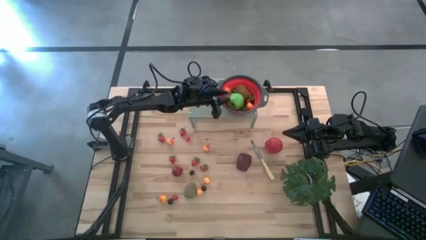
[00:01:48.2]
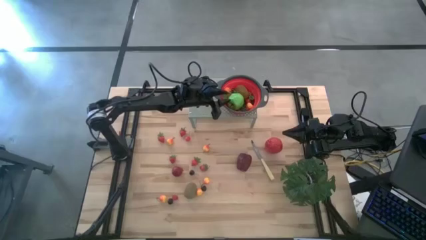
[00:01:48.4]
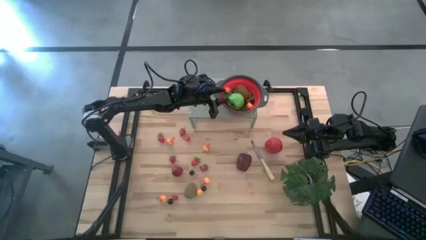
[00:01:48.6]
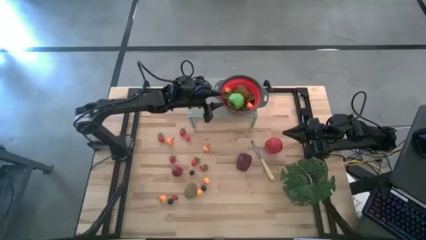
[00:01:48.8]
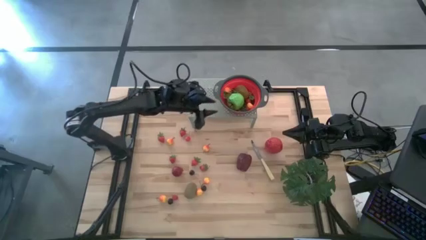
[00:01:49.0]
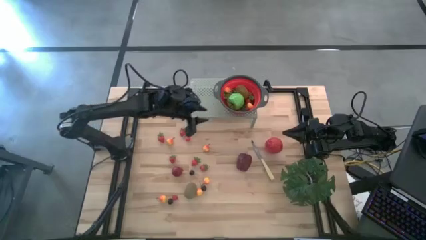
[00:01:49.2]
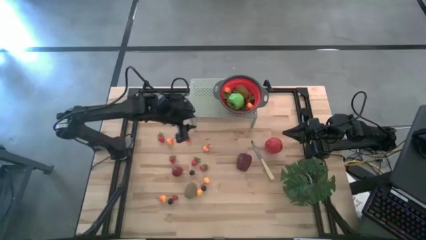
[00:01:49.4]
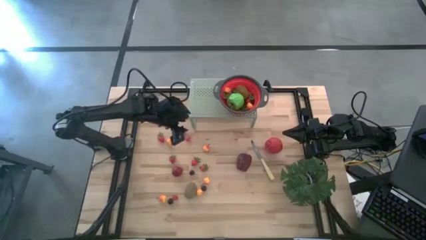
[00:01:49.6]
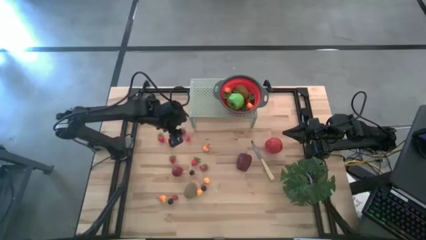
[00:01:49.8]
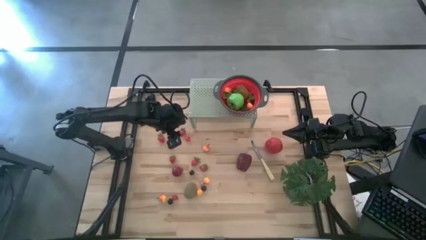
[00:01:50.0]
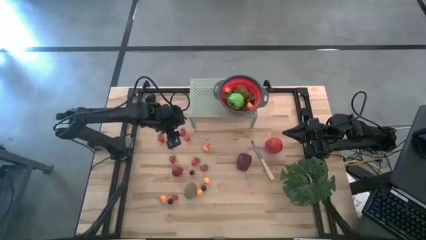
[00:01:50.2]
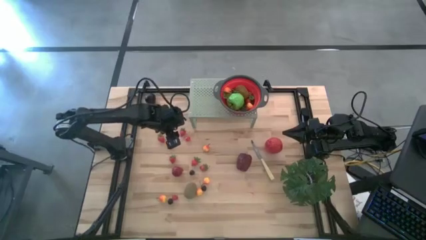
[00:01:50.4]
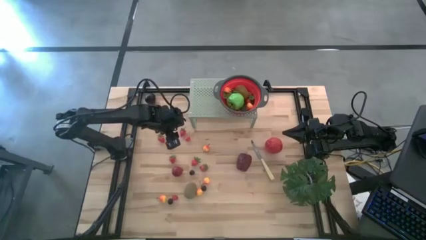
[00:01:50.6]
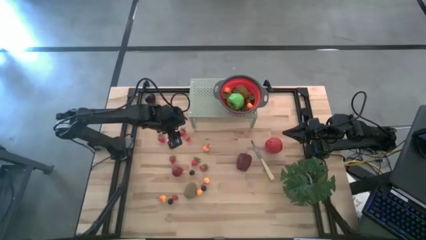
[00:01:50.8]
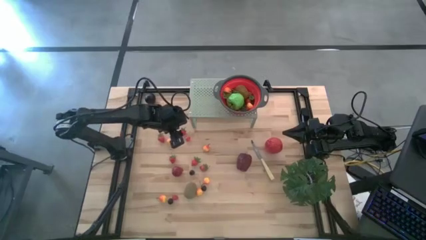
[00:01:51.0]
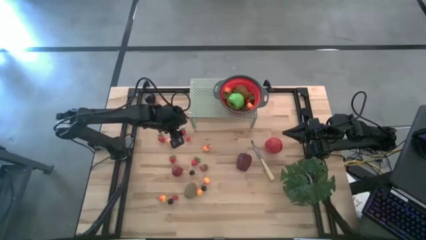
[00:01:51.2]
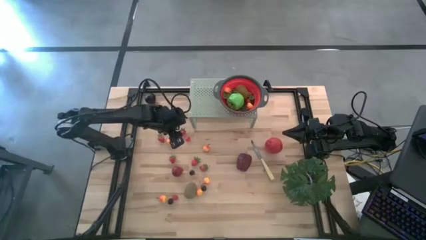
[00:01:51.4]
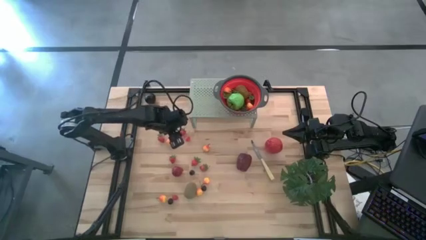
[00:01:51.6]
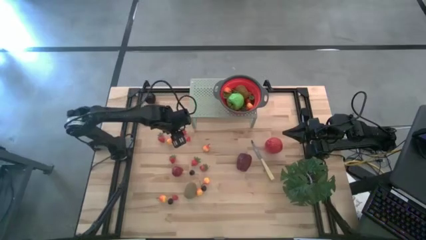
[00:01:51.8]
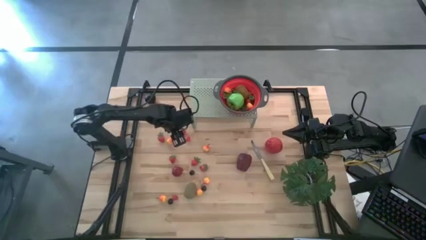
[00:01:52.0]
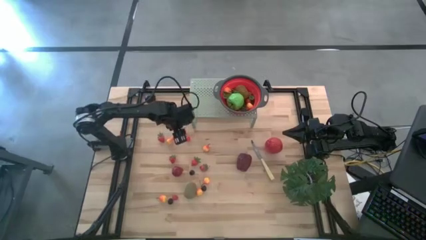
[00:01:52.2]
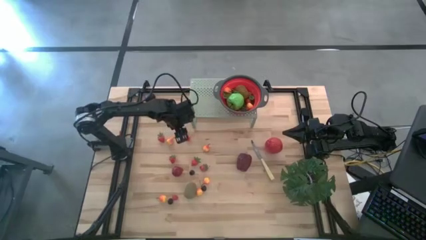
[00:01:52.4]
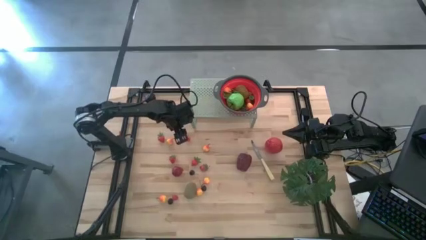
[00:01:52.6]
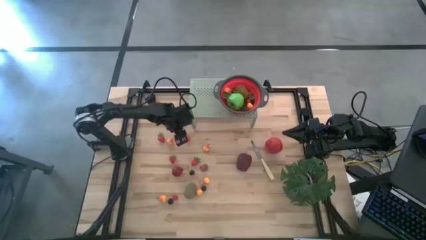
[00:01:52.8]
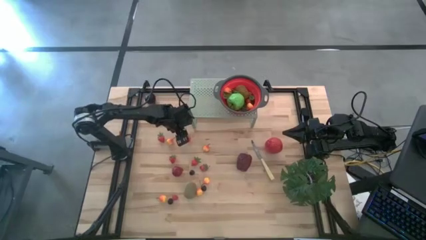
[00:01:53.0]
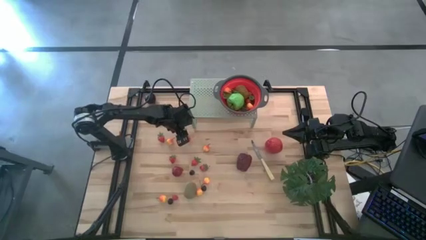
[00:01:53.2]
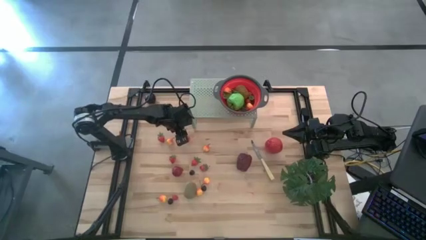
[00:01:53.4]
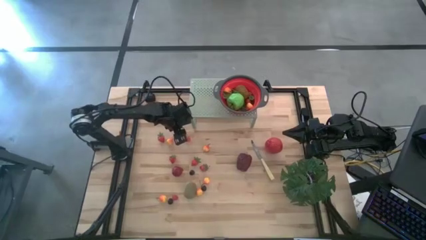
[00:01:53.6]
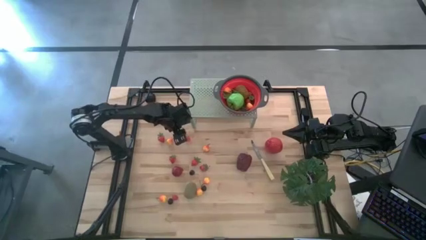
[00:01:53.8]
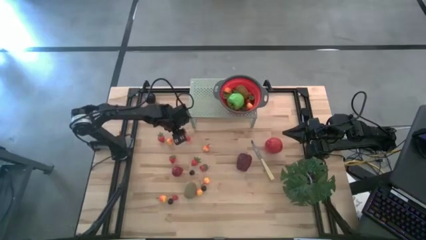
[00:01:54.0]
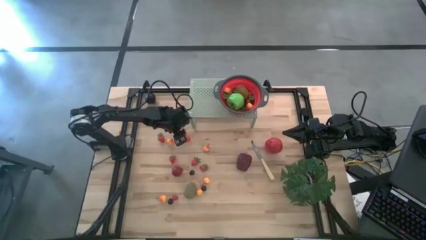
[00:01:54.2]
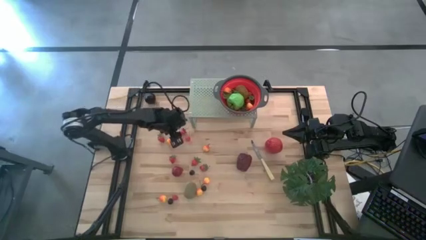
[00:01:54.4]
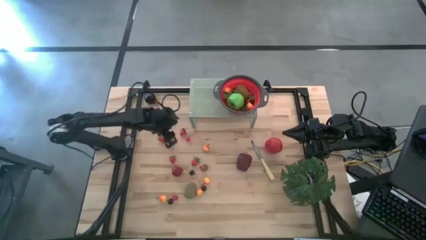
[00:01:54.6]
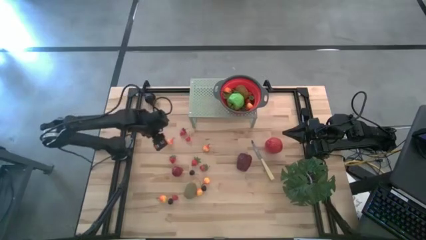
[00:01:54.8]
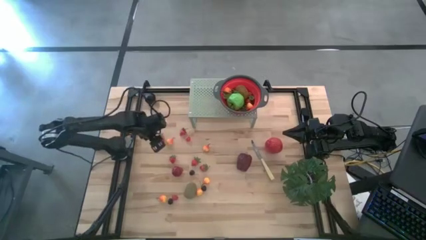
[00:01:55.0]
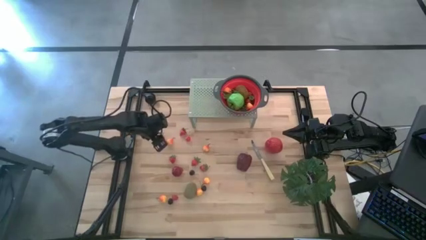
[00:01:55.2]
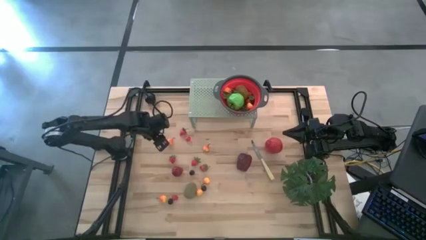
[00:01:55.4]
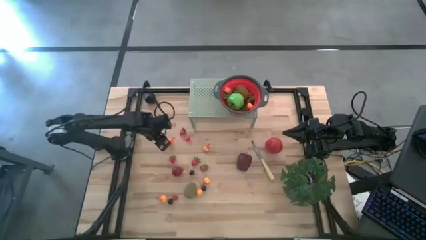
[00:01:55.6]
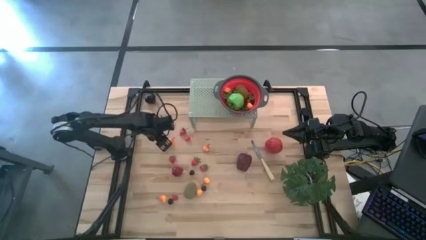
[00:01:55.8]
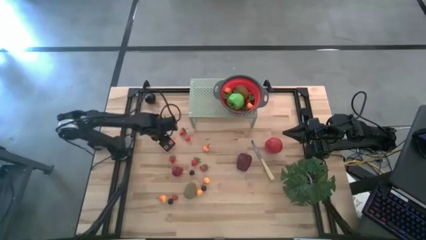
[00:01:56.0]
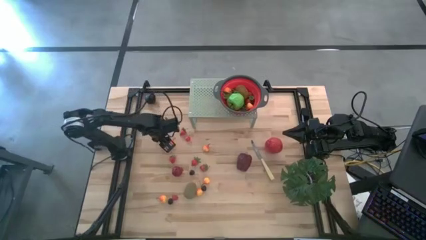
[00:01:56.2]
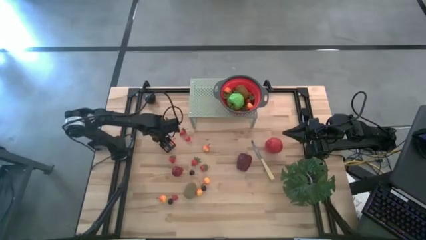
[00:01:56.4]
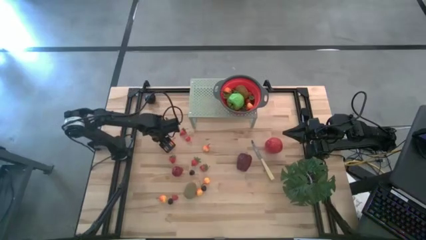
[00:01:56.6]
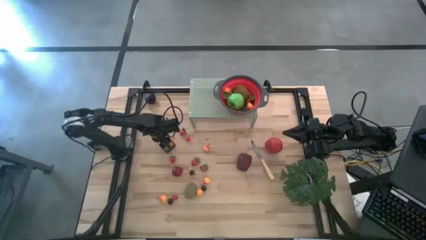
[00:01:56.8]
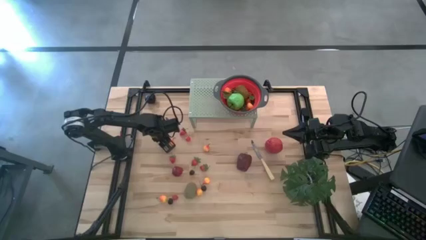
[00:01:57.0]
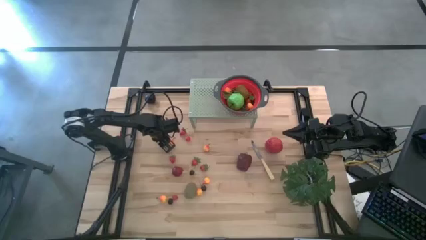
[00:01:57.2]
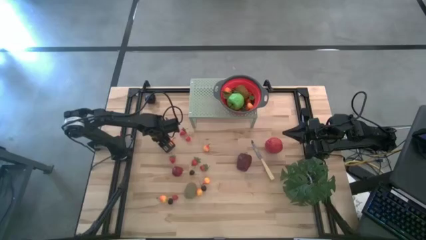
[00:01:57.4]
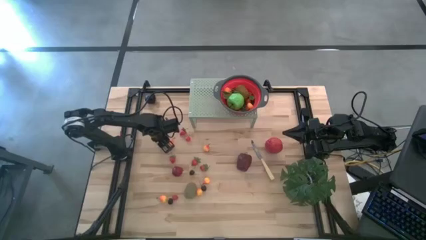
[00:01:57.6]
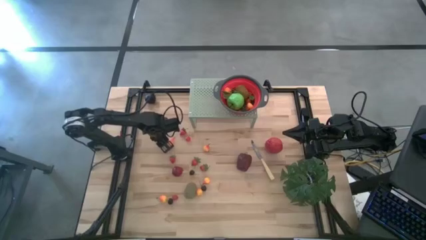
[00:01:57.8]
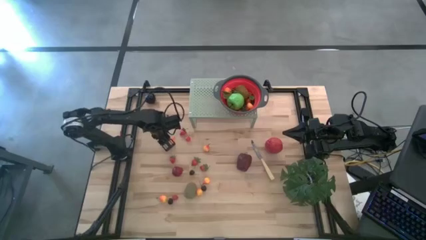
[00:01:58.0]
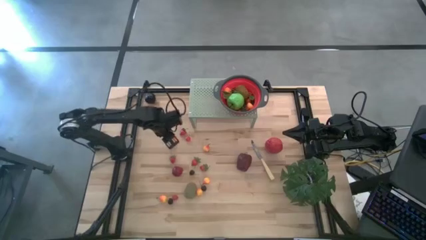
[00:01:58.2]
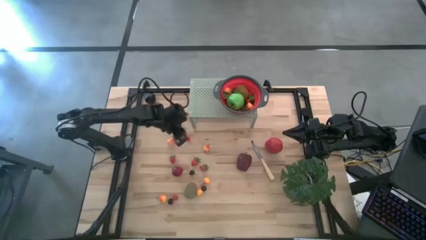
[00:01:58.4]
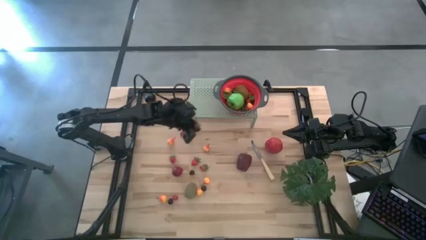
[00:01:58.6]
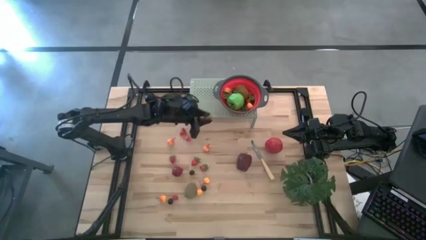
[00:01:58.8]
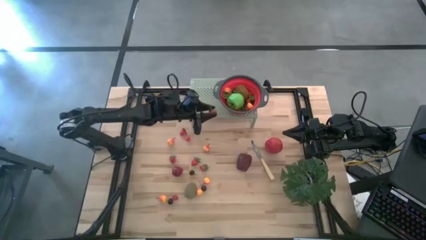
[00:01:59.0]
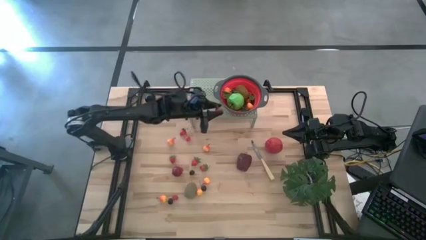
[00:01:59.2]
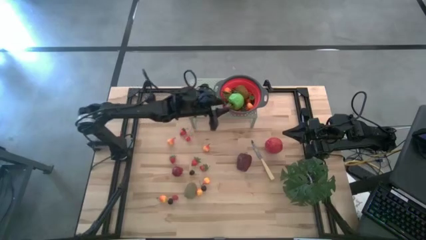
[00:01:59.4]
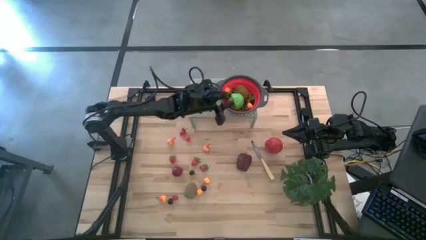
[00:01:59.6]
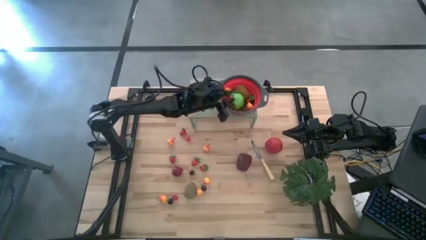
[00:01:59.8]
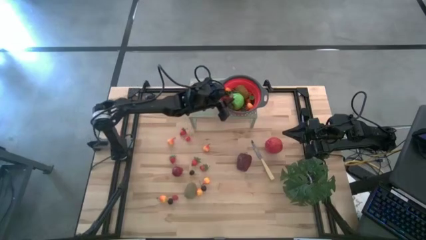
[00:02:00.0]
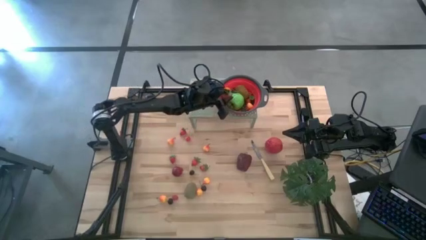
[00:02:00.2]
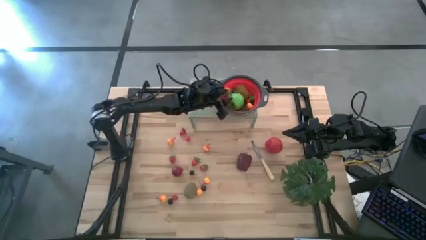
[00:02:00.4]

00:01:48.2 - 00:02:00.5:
Task: Pick & Place Fruit
Put the red strawberry into the black strainer bowl on the shelf

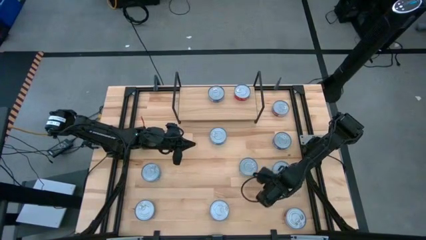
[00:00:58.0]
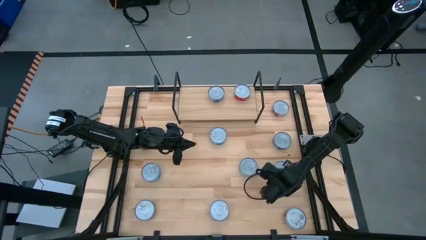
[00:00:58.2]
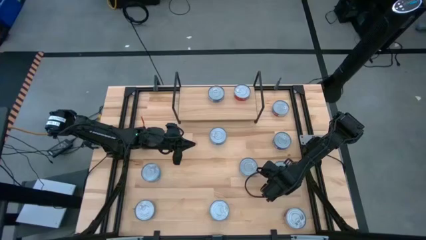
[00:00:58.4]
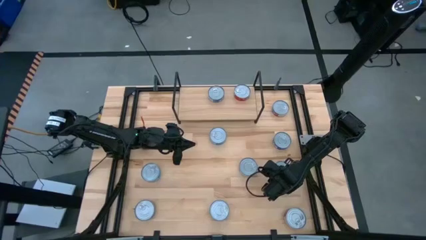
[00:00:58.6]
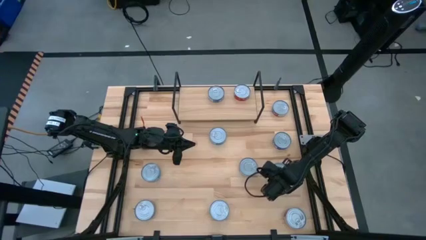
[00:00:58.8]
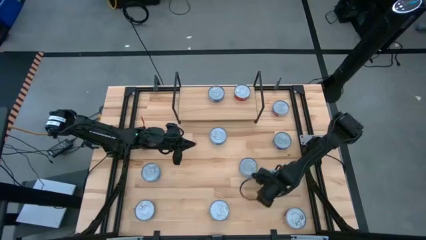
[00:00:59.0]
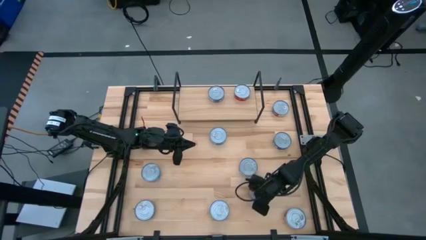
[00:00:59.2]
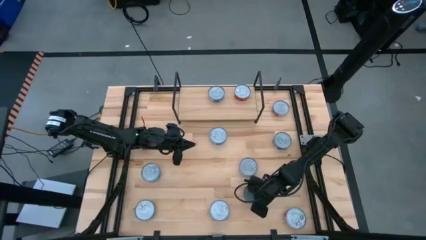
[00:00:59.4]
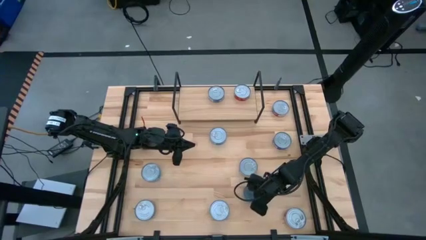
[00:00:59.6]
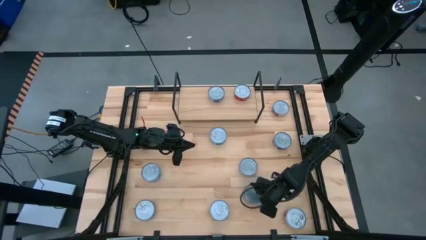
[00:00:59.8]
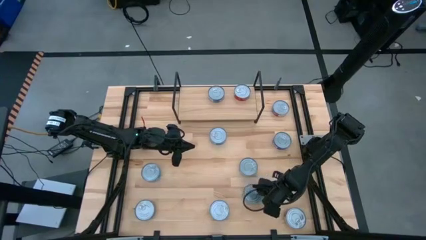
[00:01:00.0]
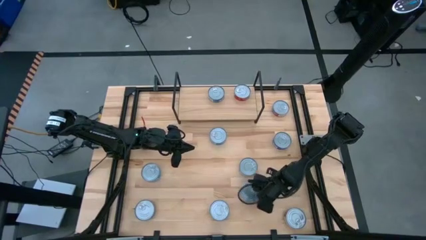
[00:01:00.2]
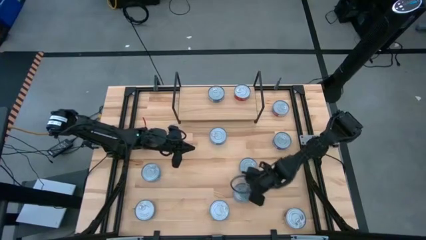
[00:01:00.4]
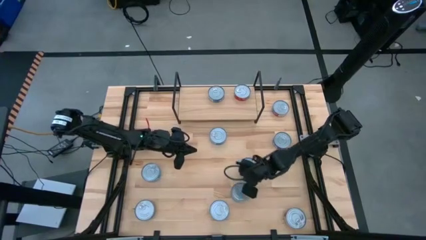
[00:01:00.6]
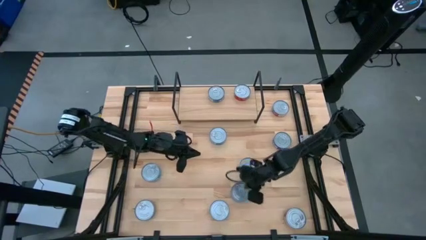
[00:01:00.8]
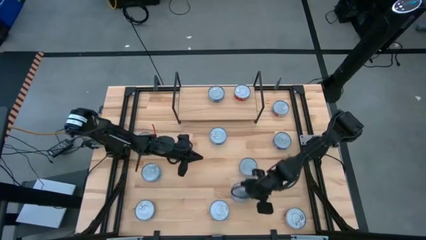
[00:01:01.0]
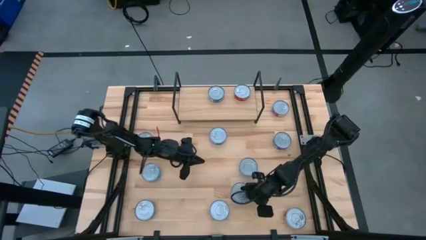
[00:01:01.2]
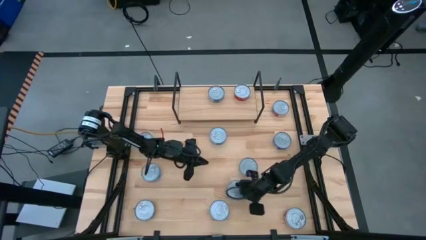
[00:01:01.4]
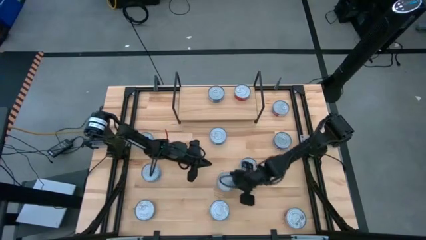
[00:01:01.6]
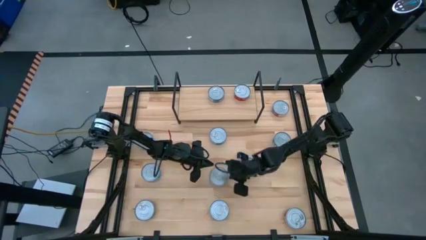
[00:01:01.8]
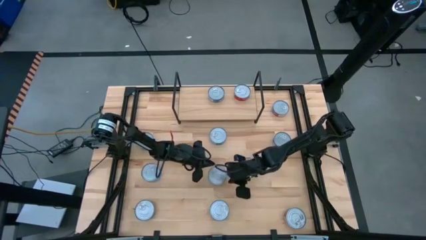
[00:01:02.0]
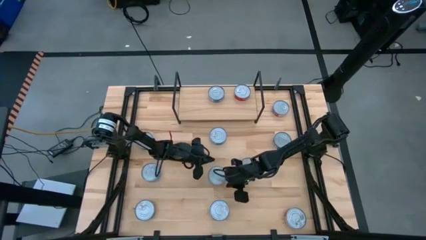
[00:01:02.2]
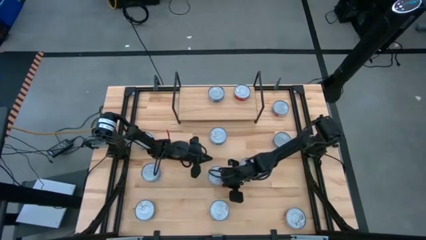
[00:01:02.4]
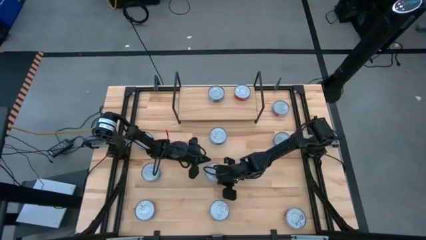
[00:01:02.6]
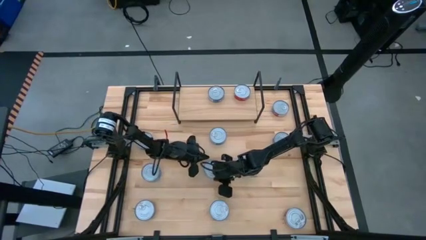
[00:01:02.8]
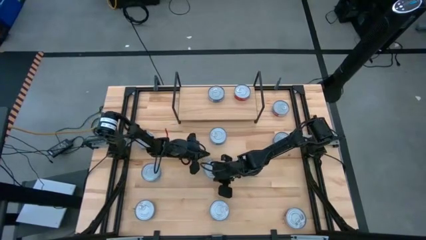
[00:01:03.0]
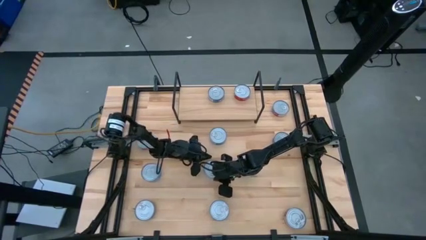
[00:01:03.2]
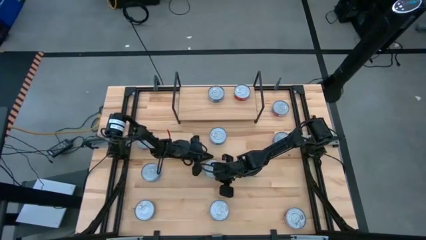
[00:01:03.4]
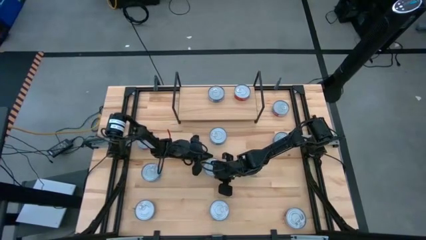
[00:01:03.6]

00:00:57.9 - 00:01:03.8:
Task: Stack canned seafood by type on shelf
Move the middle right light blue tuna can to the center of the table
